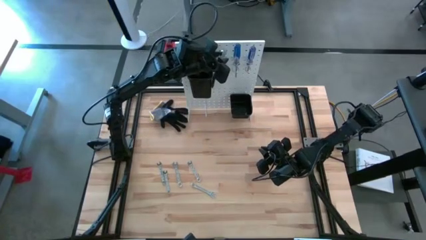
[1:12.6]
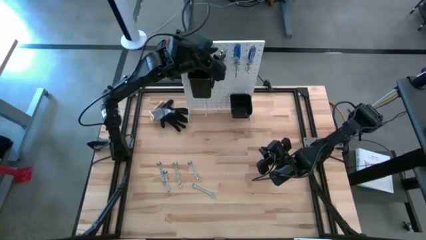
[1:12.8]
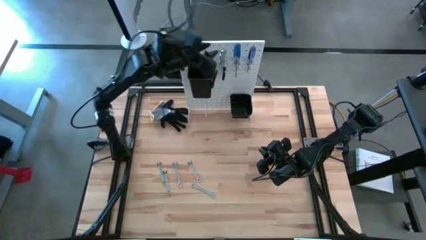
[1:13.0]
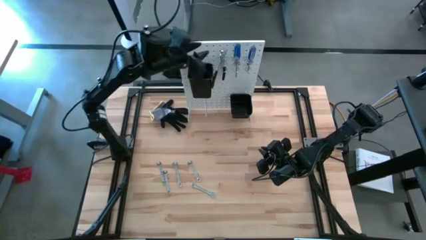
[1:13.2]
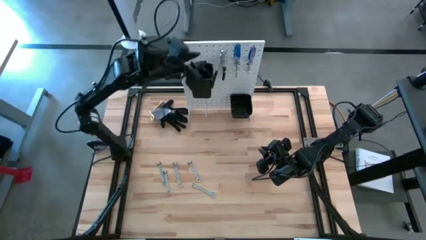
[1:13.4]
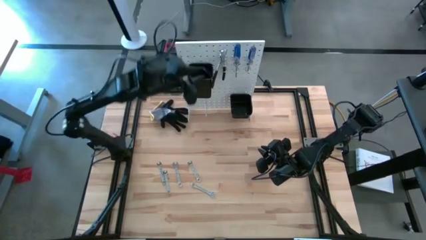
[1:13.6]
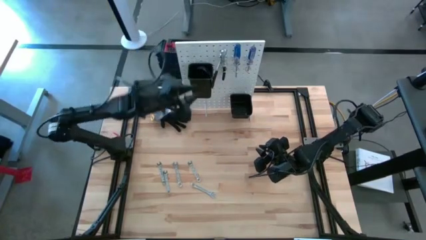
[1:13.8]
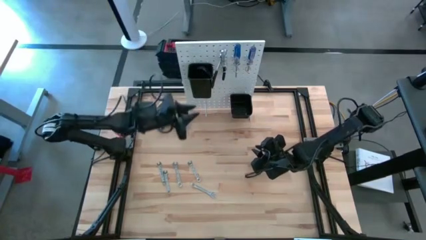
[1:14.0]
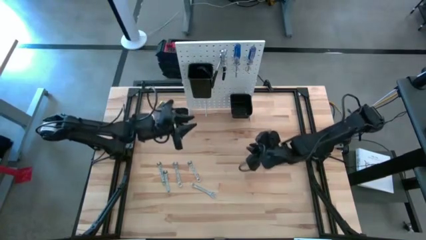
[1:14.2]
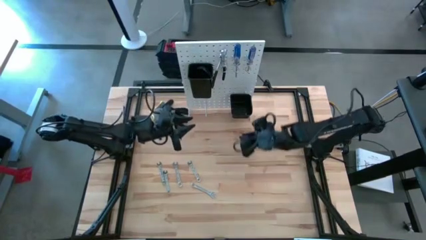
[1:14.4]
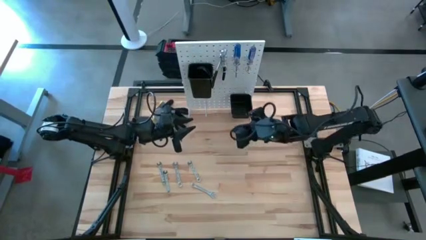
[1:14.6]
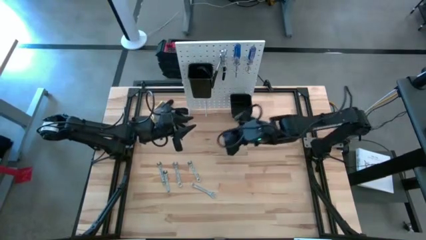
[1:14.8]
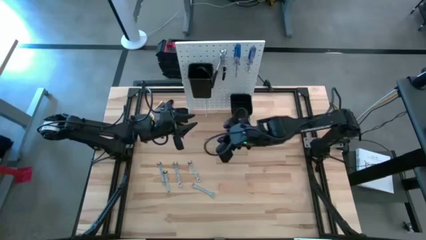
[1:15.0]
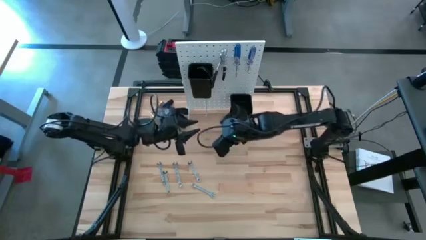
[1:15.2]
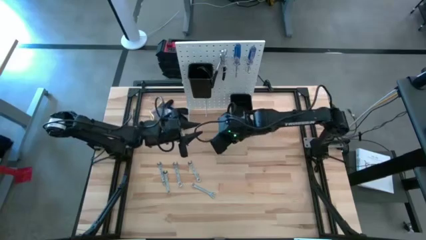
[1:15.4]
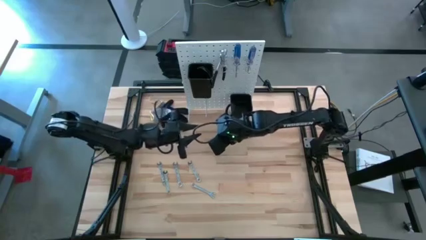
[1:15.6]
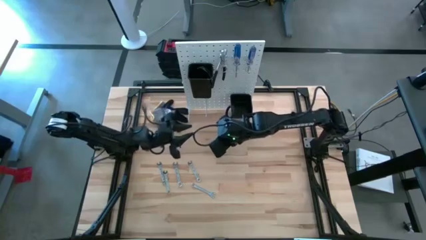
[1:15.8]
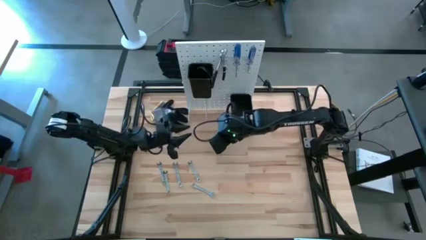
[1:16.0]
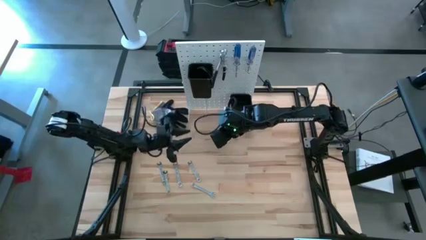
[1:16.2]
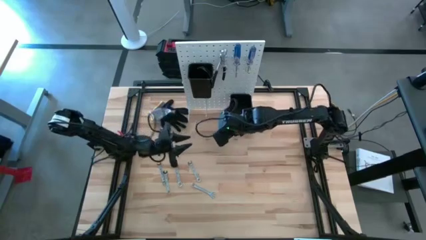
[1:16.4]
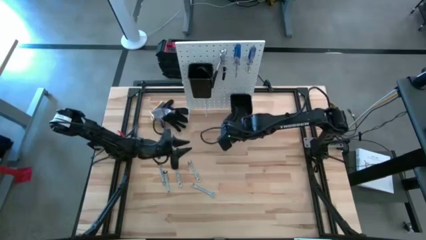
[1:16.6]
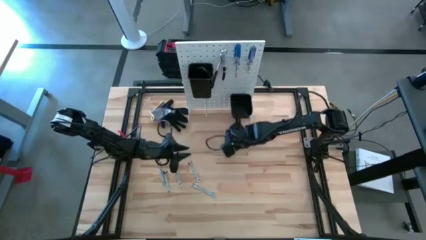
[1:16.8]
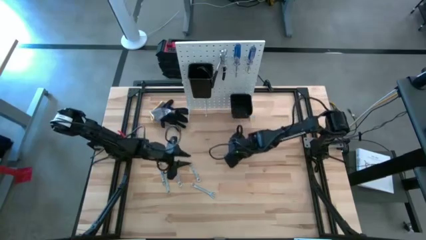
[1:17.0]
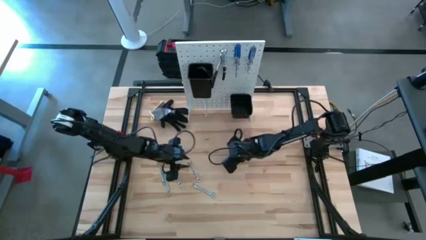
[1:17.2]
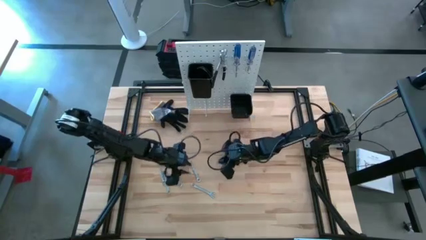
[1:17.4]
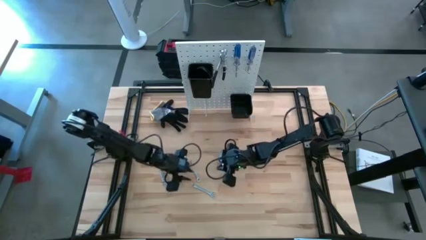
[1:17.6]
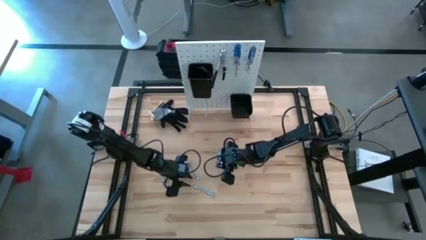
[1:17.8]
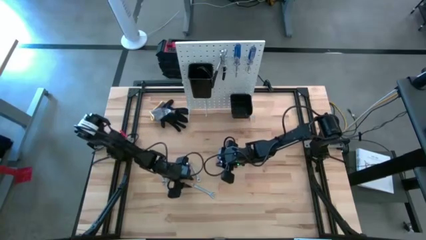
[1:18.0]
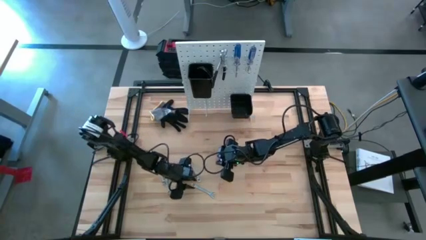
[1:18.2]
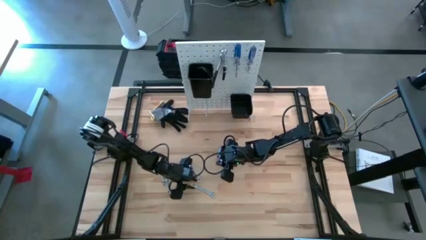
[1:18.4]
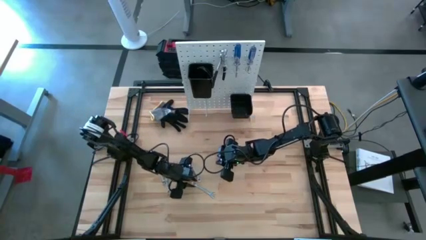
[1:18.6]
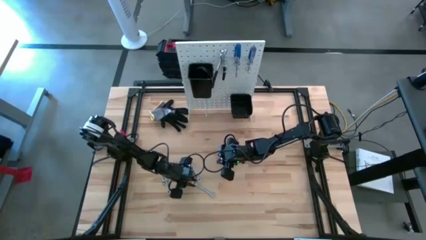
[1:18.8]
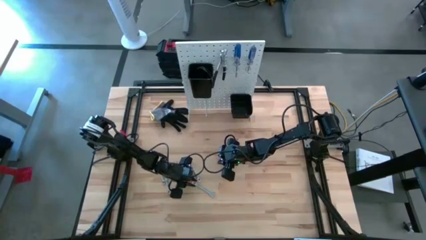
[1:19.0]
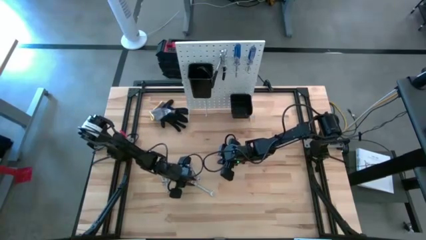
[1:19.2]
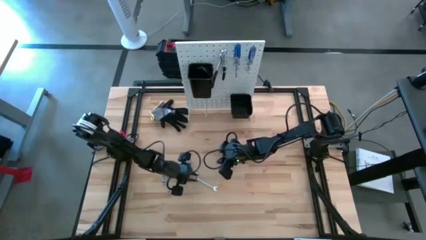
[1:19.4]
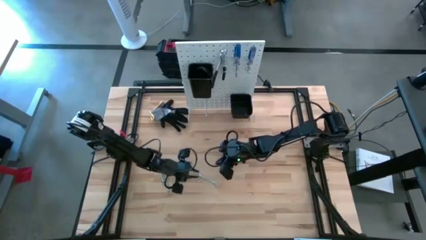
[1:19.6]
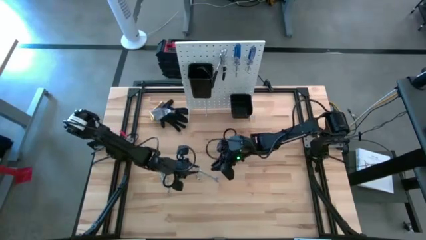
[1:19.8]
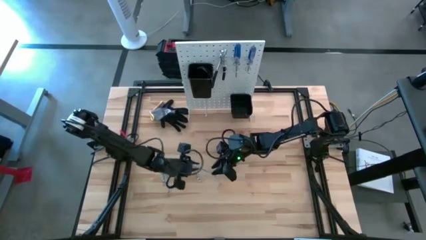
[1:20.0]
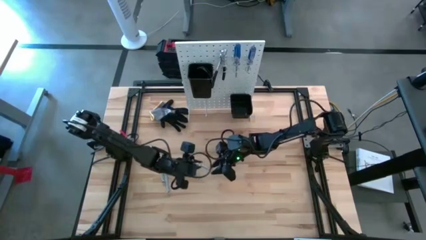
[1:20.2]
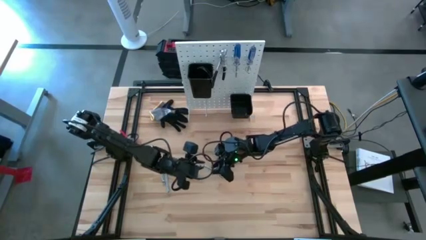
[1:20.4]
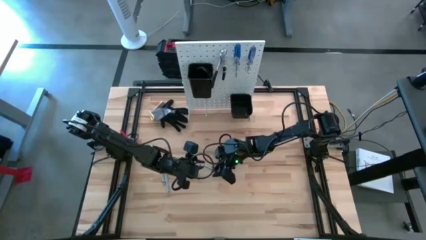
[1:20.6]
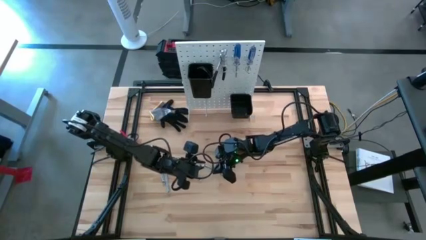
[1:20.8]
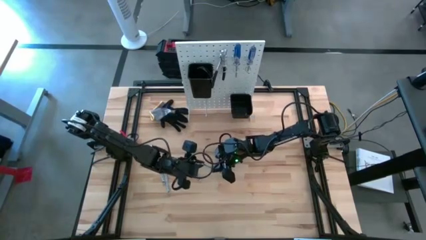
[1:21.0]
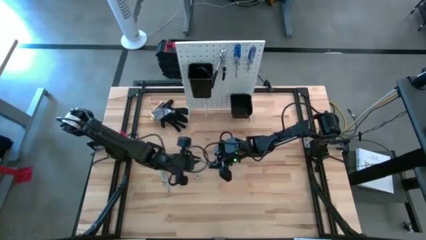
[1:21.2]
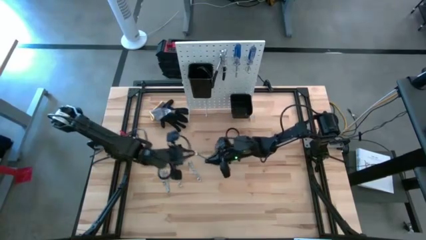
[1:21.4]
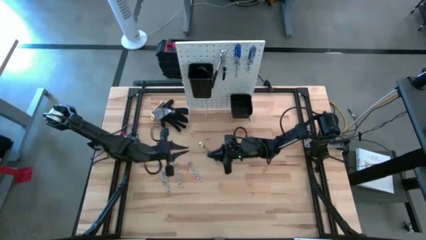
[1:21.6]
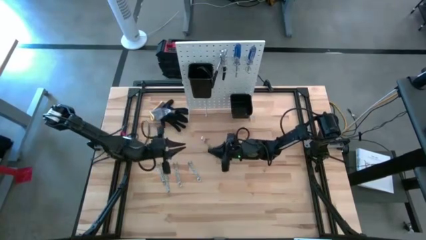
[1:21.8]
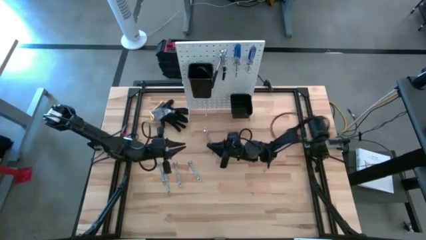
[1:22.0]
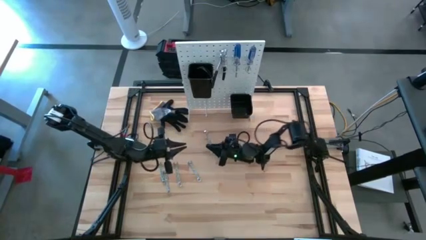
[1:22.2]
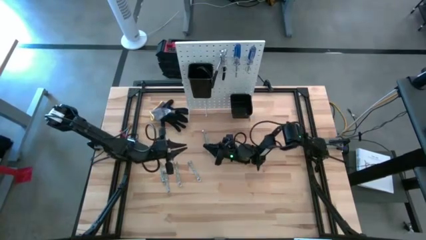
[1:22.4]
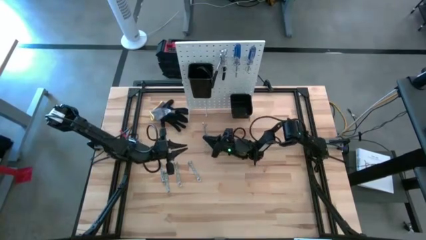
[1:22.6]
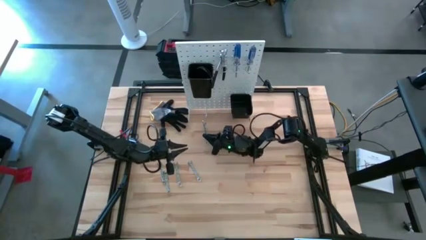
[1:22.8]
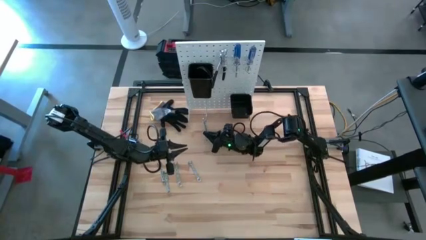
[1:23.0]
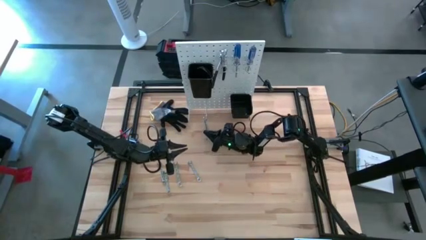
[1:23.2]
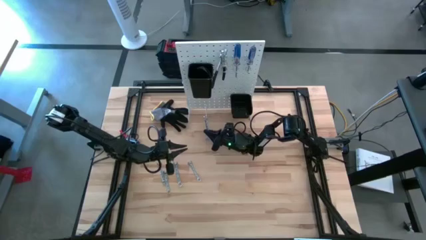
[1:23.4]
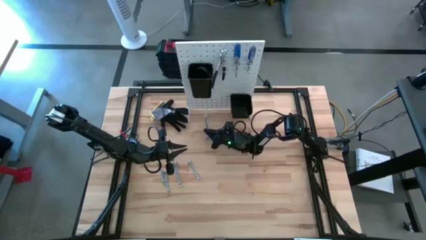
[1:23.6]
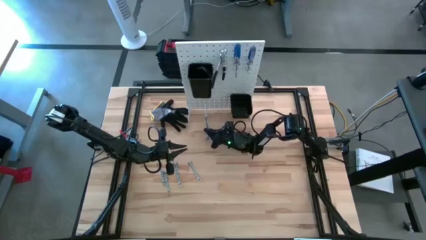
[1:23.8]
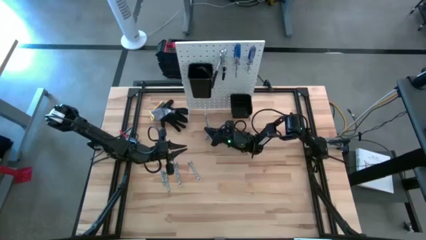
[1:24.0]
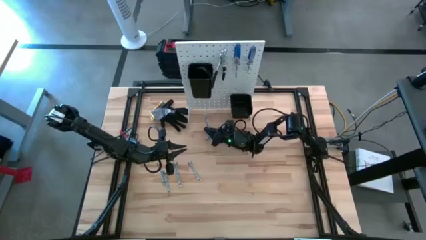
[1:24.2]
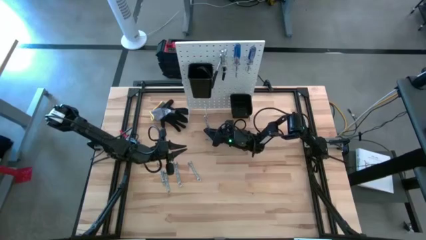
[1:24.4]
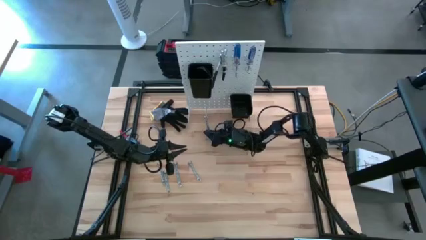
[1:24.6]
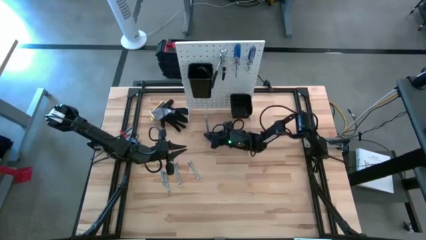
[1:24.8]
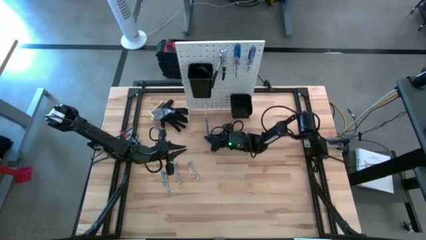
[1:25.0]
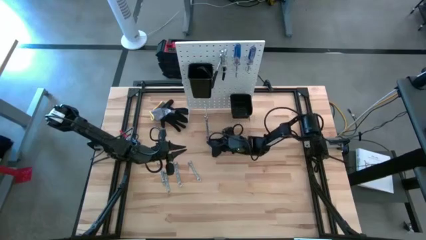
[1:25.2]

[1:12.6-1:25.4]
Task: Hang tools onto peg board
Hang the silver wrench on the peg board

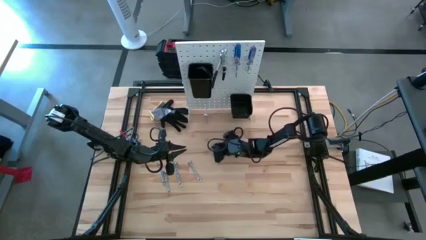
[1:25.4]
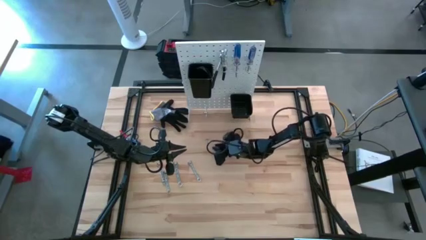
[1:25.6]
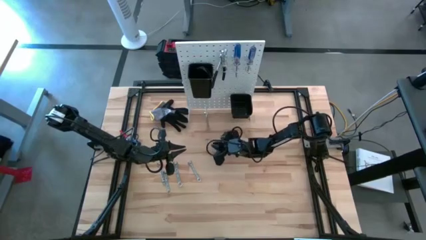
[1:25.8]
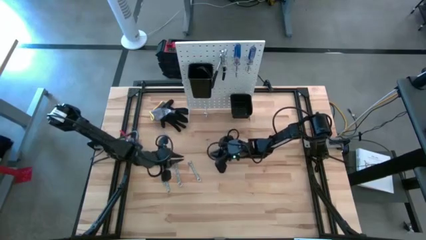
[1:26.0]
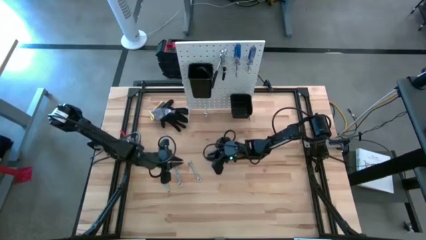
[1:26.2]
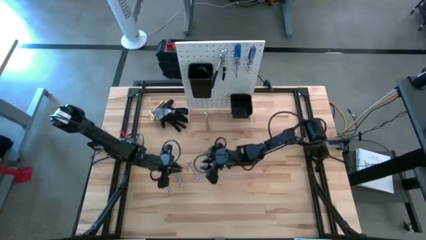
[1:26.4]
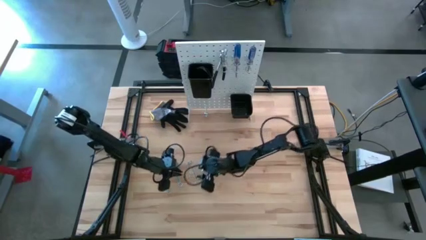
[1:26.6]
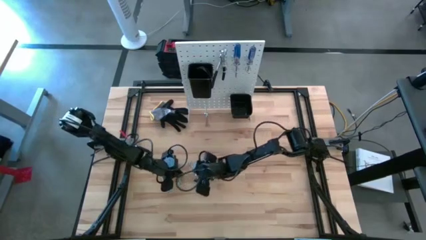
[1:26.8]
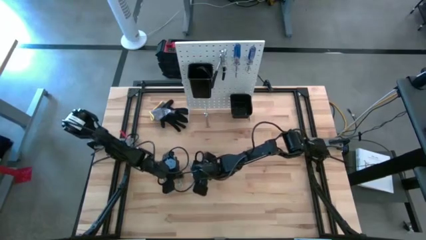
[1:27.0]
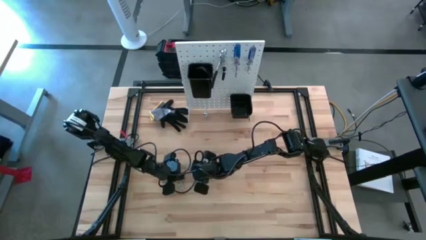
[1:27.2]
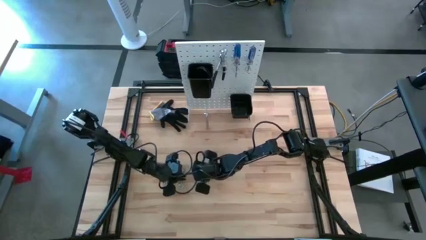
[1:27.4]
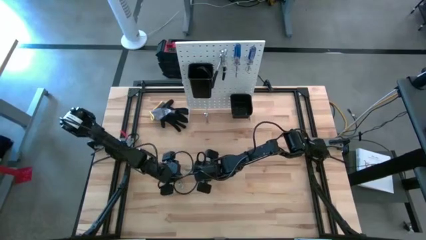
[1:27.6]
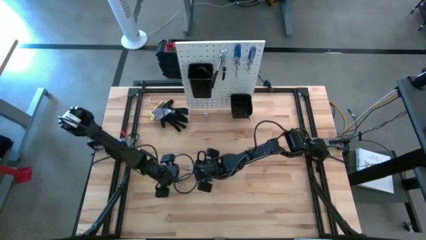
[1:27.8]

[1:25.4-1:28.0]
Hang the wrench on the peg board

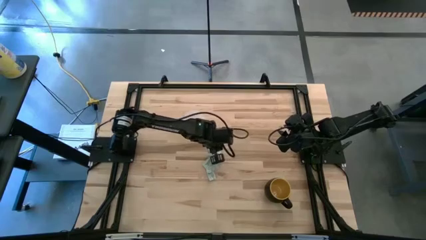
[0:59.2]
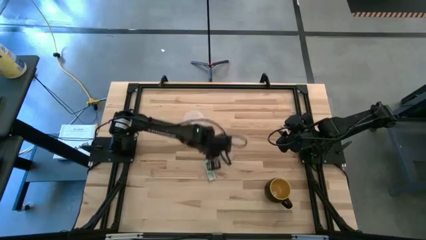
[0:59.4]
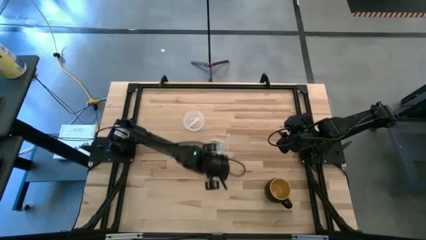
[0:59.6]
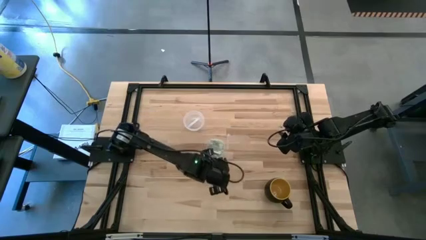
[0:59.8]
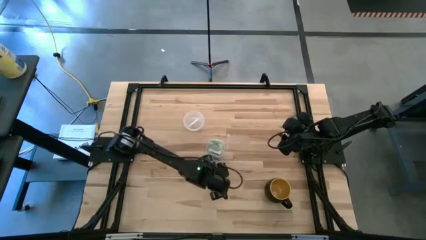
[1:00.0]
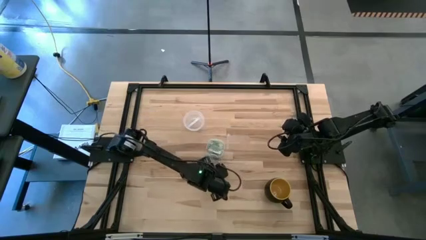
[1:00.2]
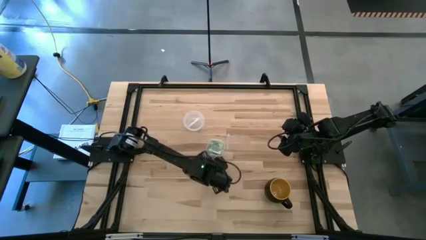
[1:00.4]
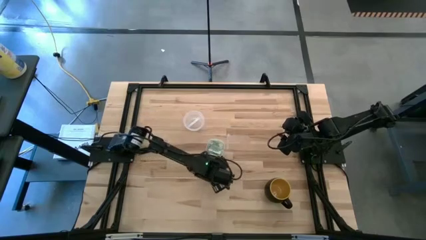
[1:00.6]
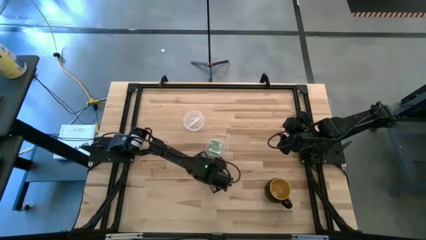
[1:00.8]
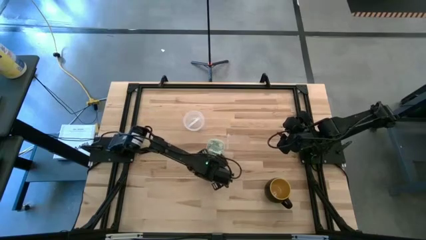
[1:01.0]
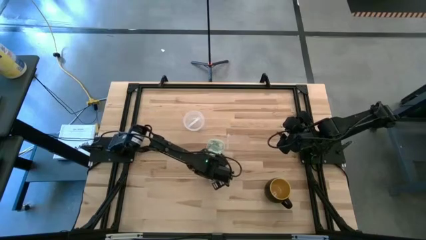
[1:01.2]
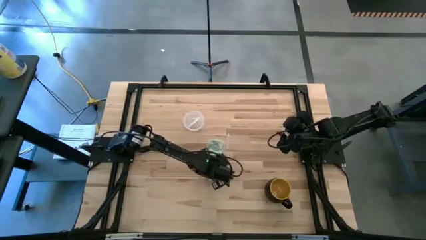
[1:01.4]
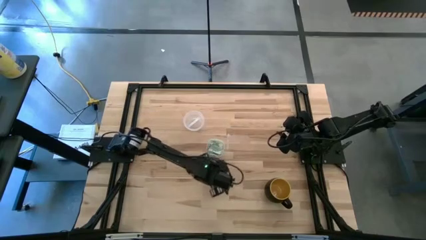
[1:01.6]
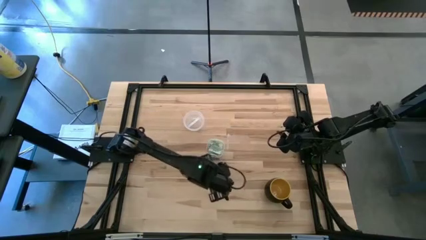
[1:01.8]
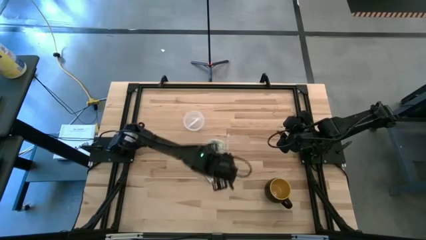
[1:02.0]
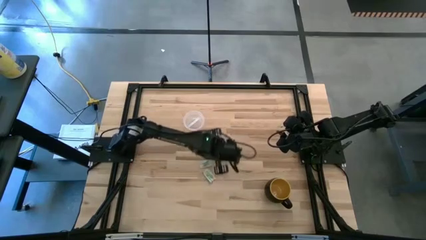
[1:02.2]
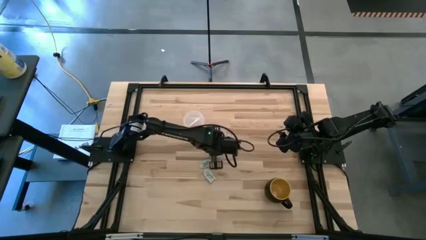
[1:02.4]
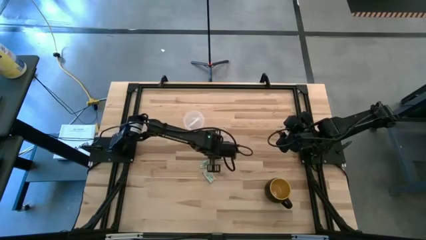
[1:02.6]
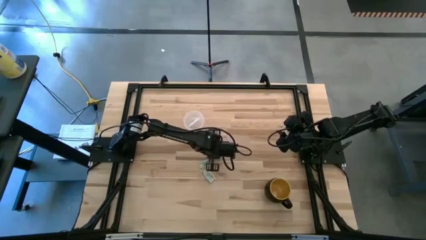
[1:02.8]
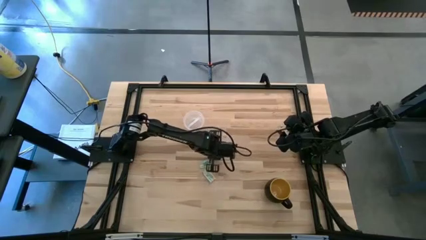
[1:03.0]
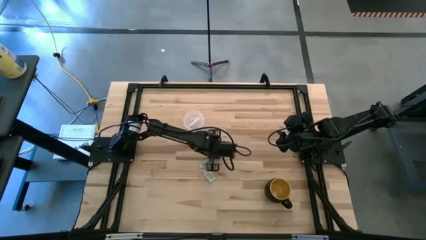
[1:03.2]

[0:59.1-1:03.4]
Task: Pick and place items into bin
Put the middle light green stevia packet into the transparent bin
